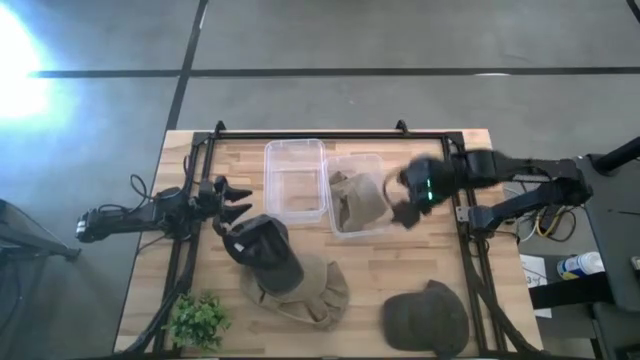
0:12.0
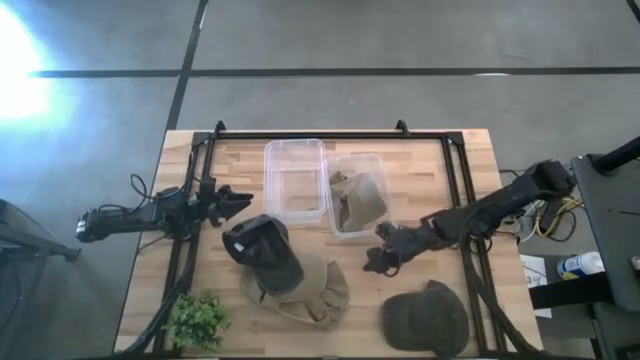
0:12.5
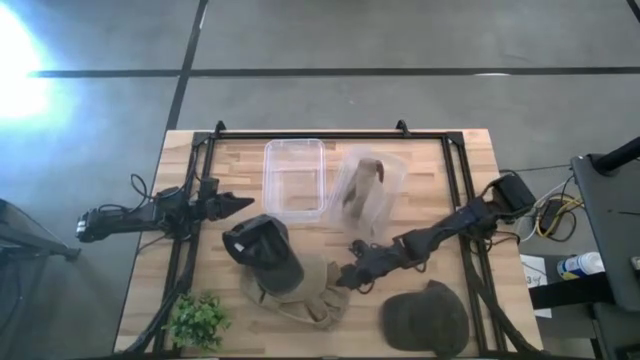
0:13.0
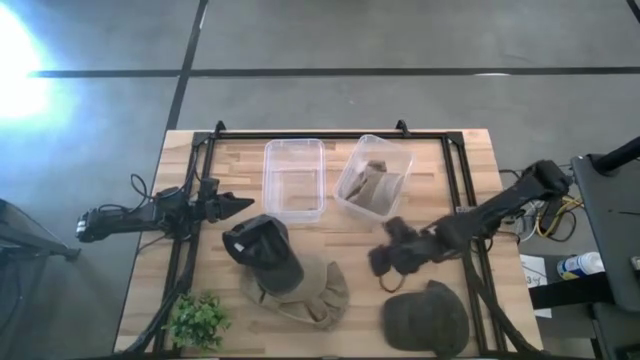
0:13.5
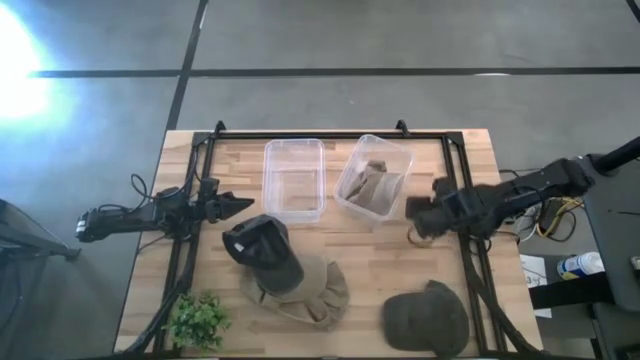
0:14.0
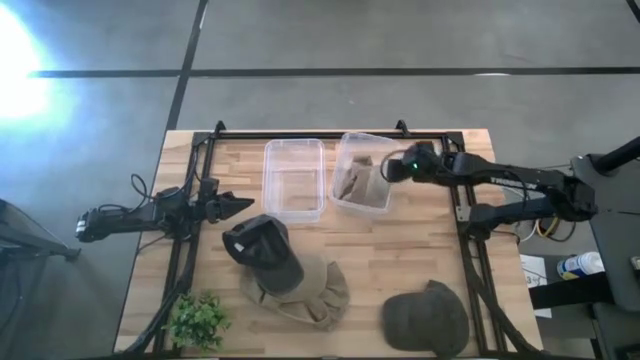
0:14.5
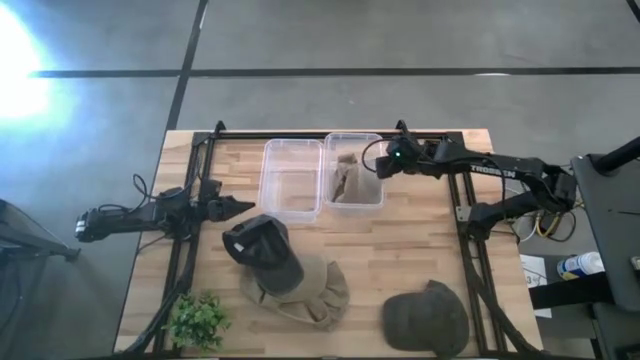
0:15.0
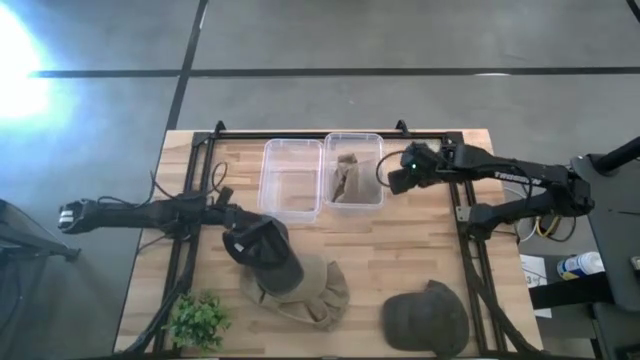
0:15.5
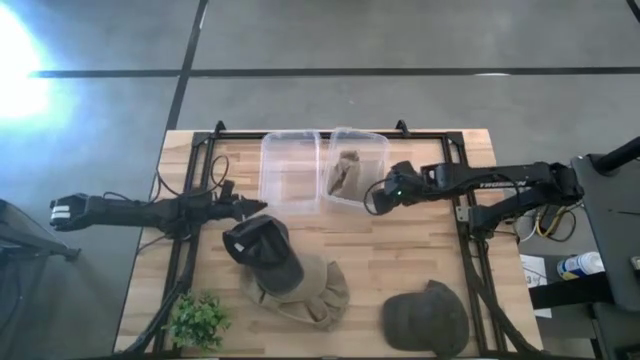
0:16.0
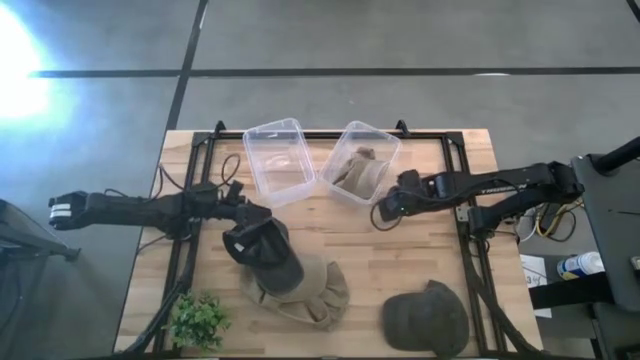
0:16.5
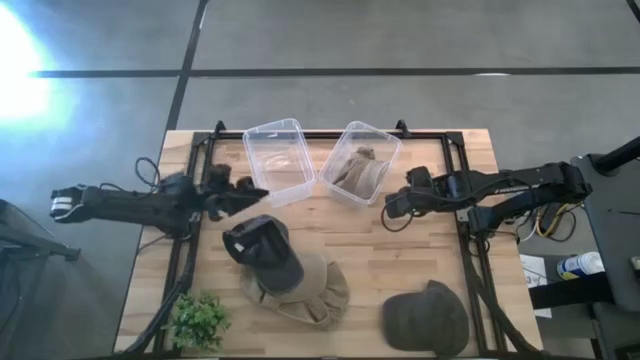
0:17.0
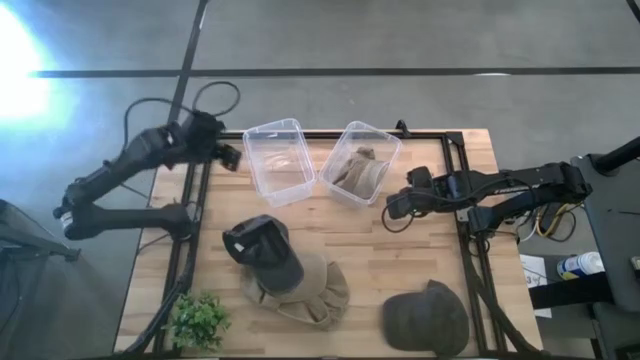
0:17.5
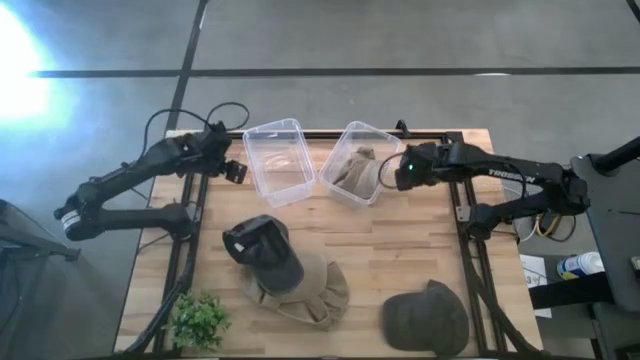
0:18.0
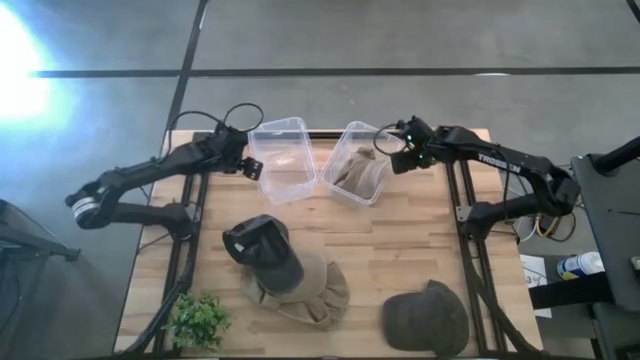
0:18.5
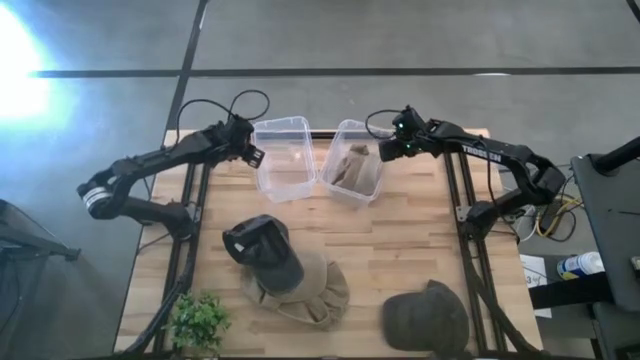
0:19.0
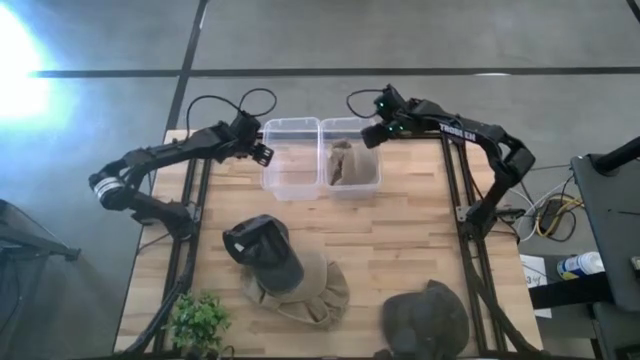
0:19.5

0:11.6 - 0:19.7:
Task: Pick & Place hat
Adjust the transparent bins

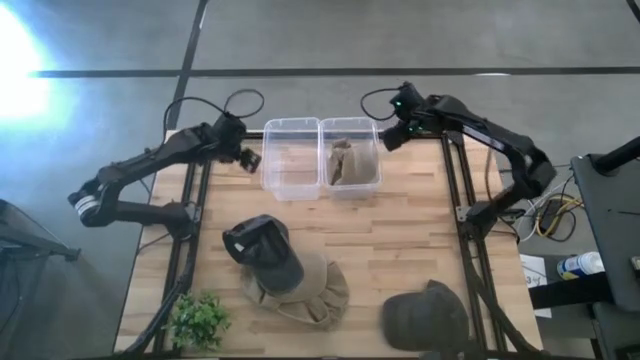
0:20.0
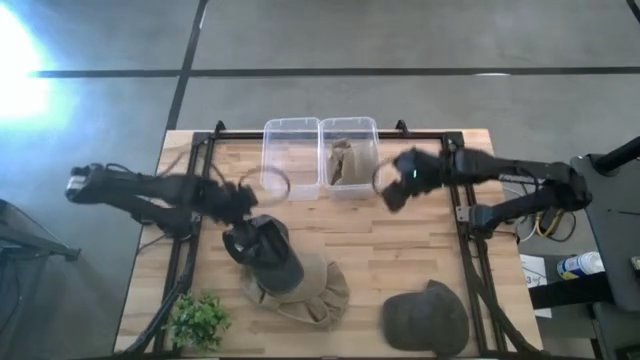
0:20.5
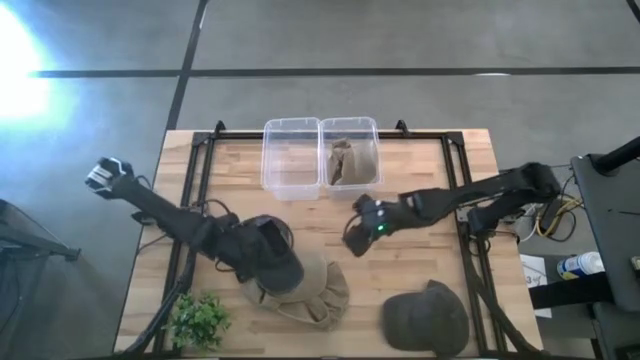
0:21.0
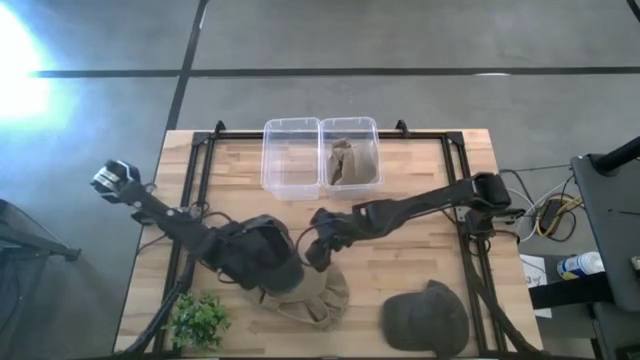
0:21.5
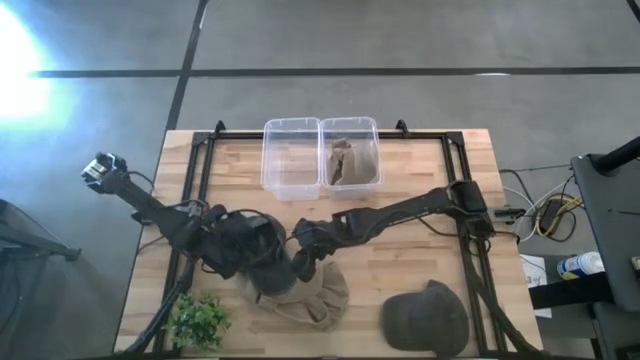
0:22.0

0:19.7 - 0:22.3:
Put the left dark gray cap into the left transparent bin

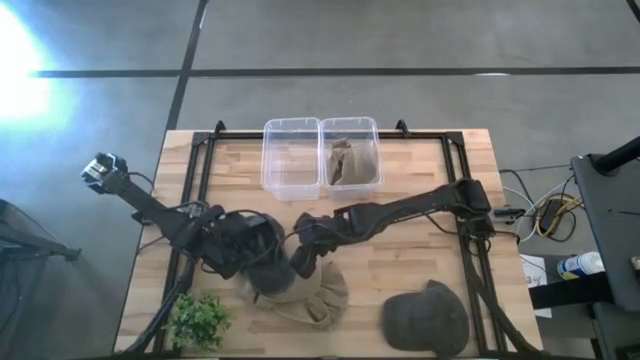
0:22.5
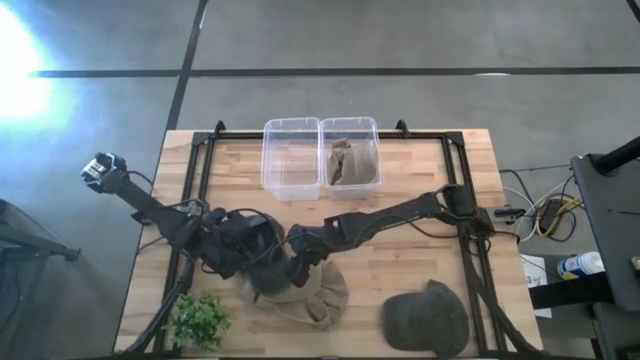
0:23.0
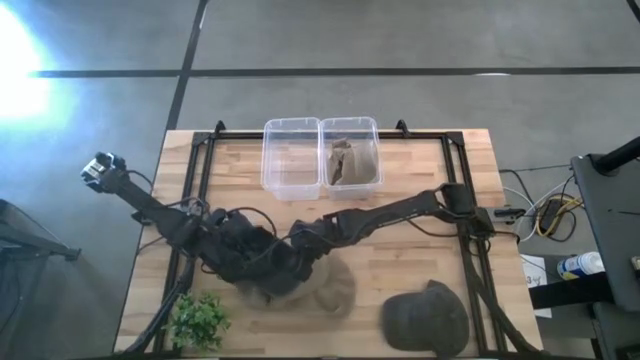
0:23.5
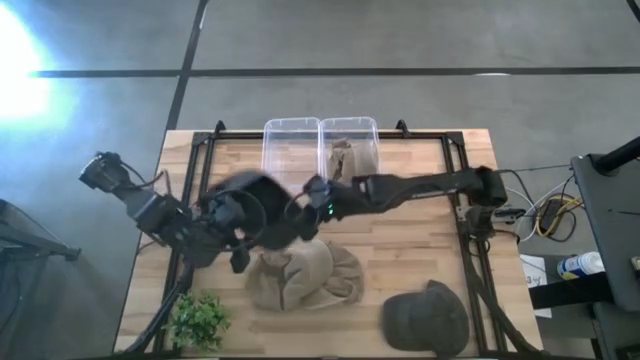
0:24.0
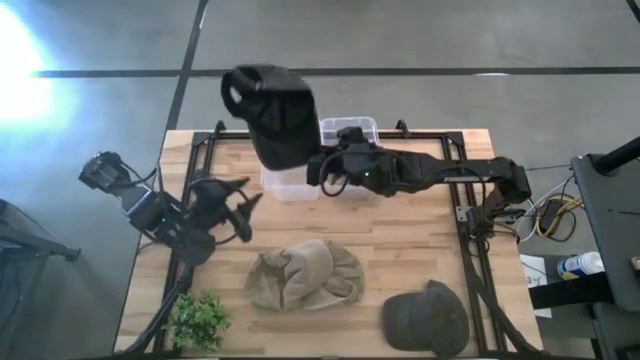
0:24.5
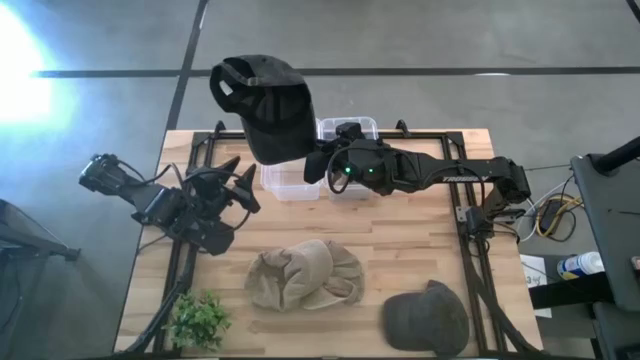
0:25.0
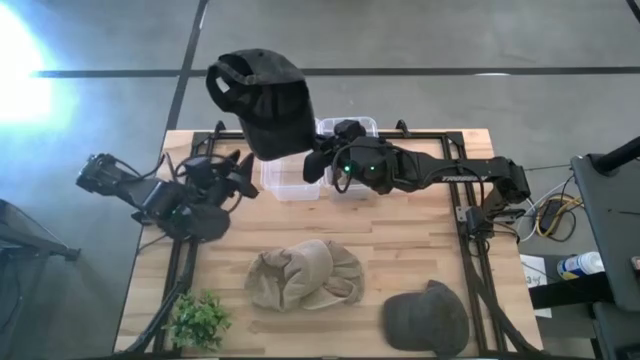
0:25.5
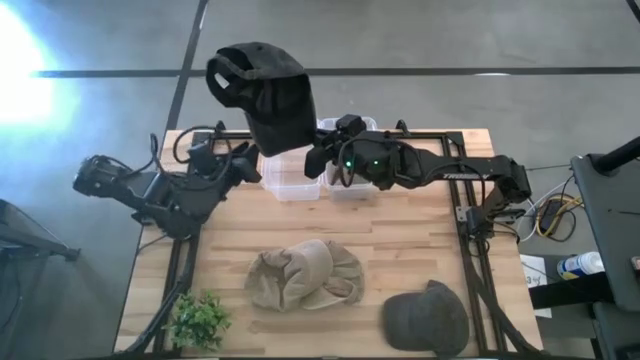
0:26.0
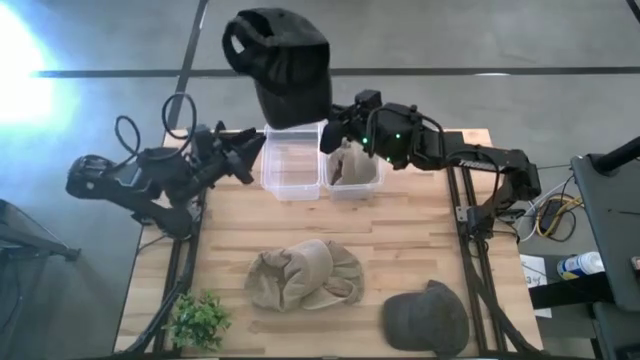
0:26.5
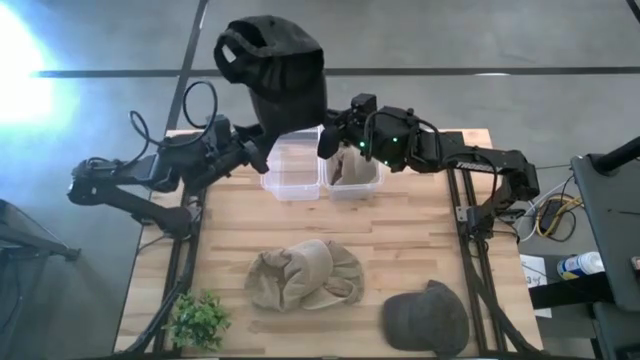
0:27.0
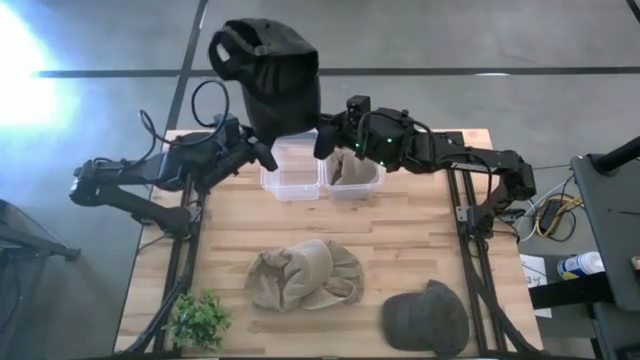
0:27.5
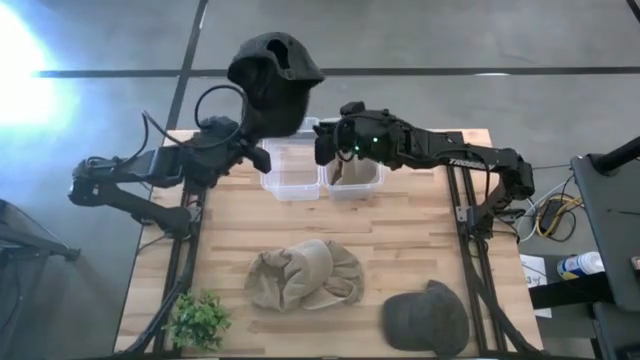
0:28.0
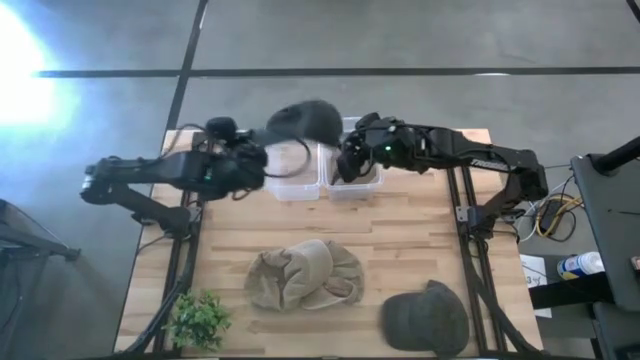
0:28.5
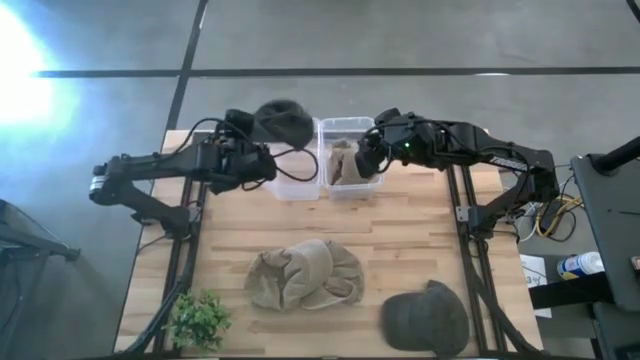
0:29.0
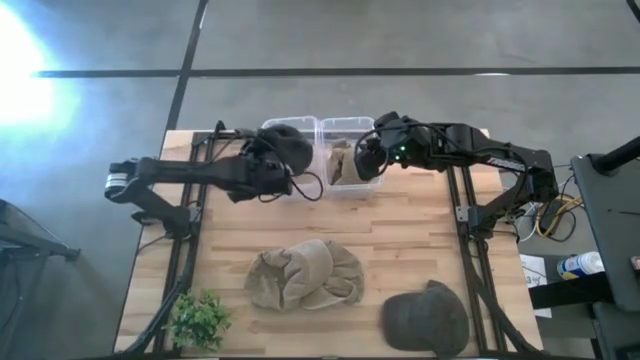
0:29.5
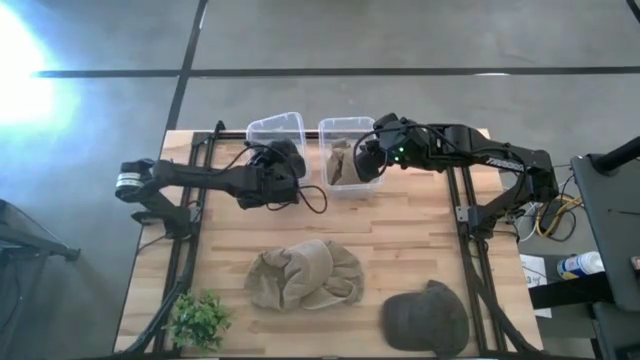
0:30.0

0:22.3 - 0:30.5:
Put the left dark gray cap into the left transparent bin

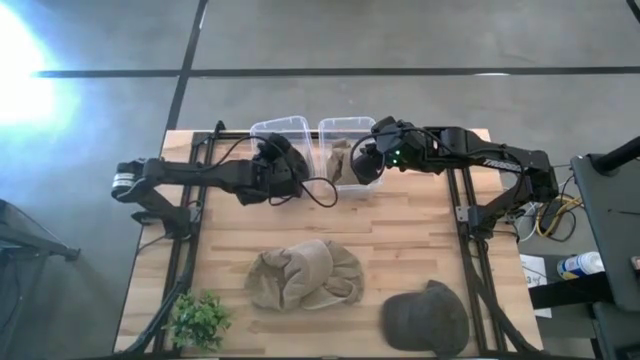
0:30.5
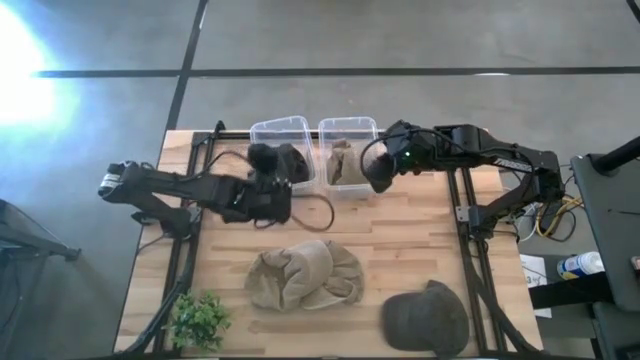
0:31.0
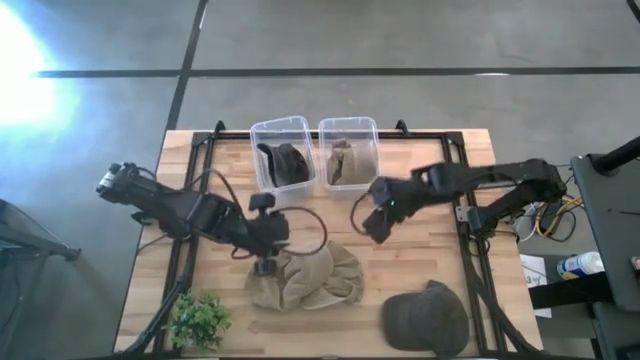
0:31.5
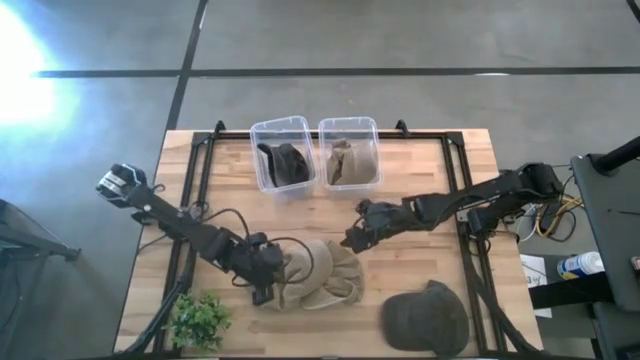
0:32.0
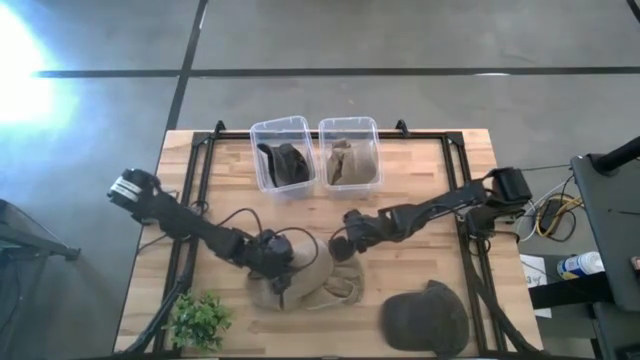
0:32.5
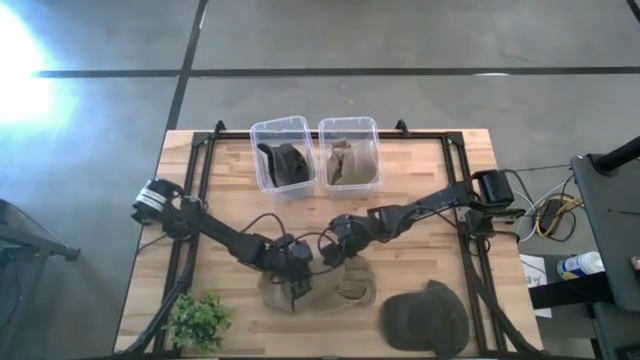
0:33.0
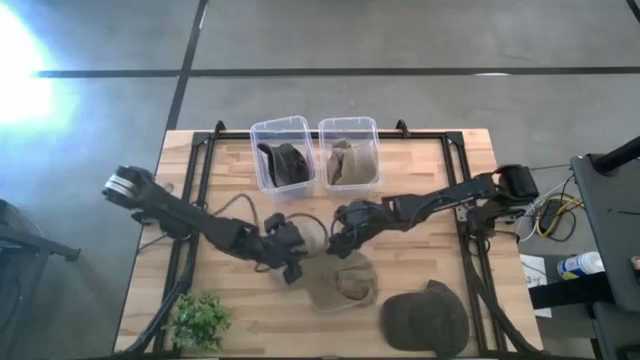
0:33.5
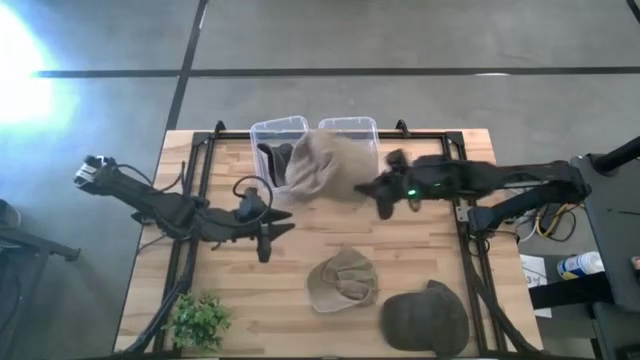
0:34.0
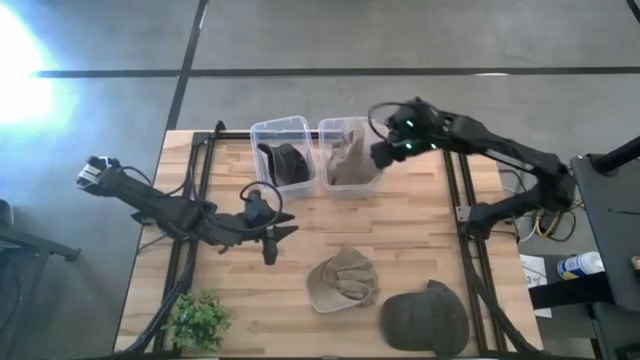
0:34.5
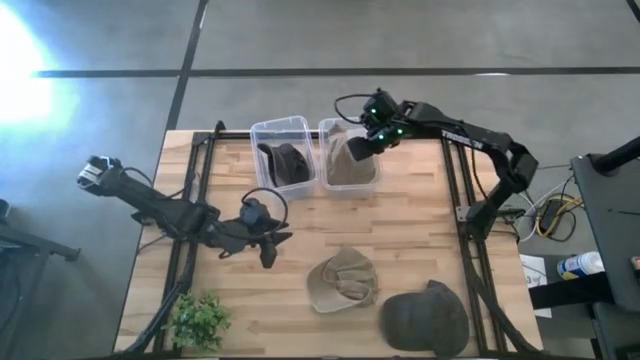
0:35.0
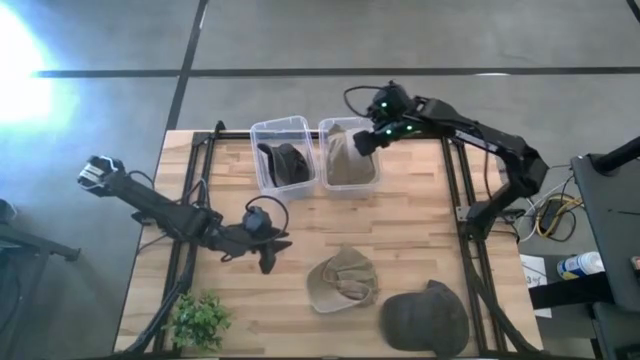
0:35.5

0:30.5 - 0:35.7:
Put the left brown cap into the right transparent bin
